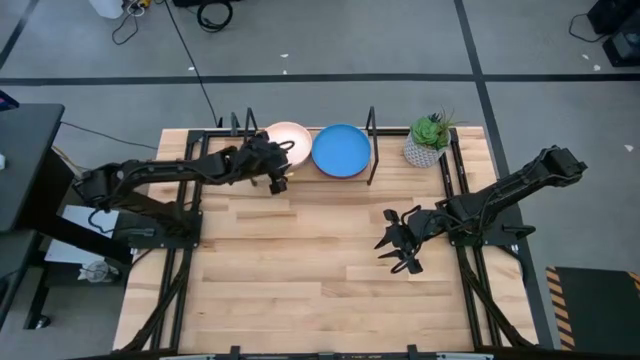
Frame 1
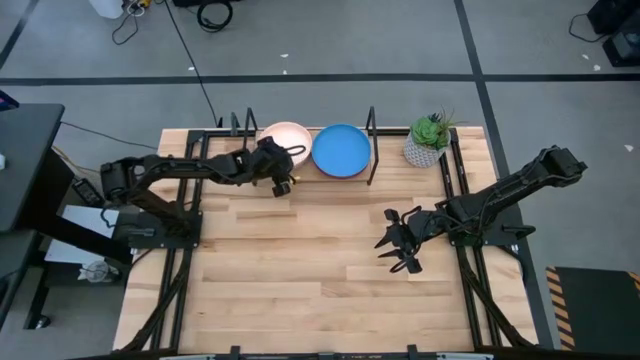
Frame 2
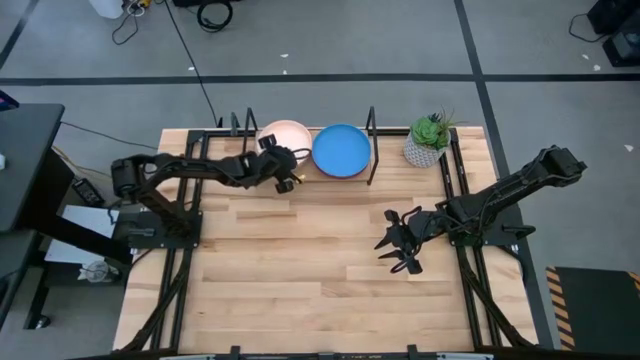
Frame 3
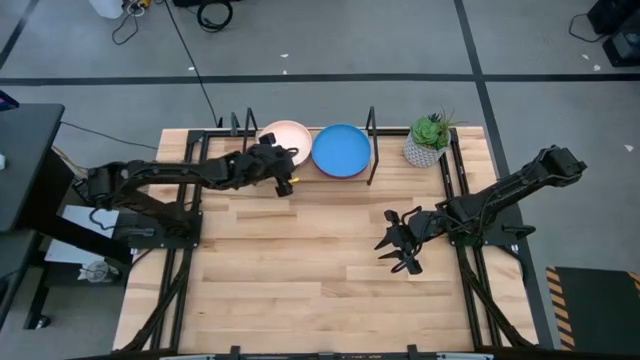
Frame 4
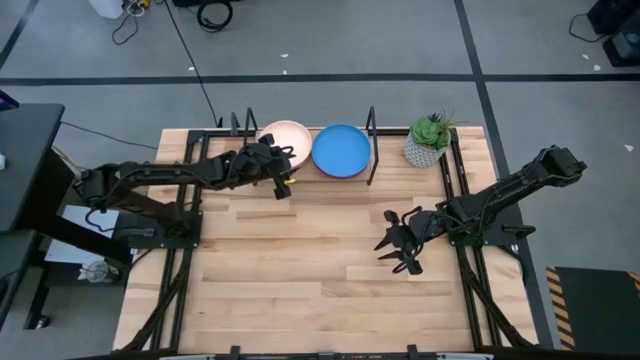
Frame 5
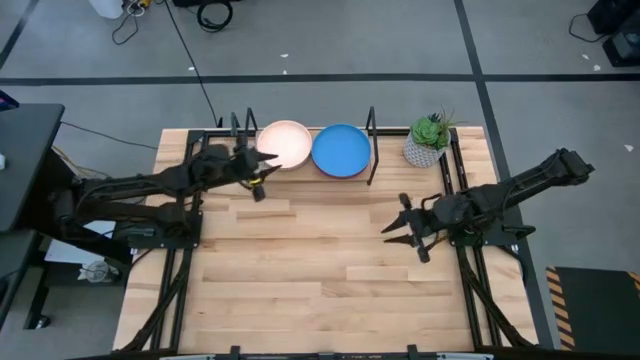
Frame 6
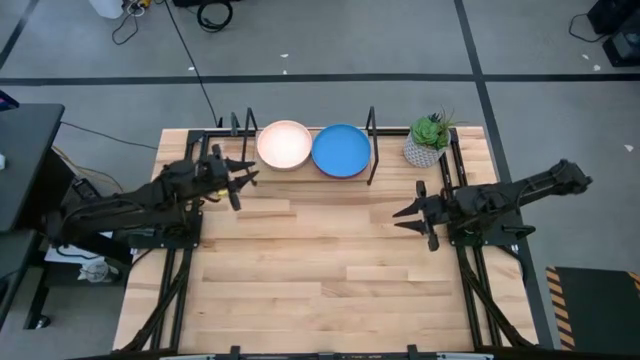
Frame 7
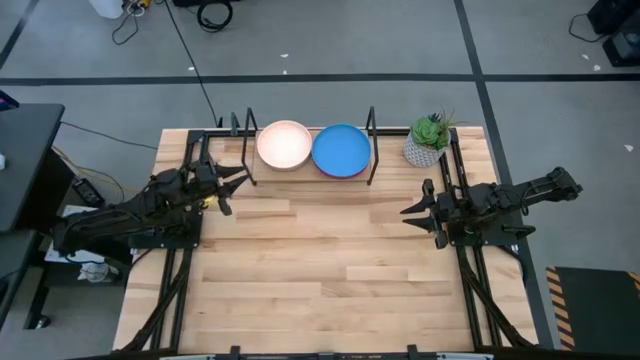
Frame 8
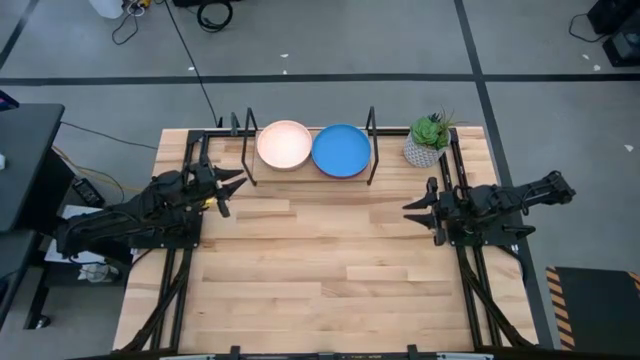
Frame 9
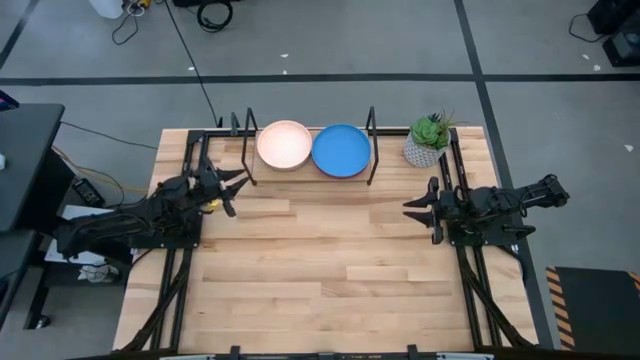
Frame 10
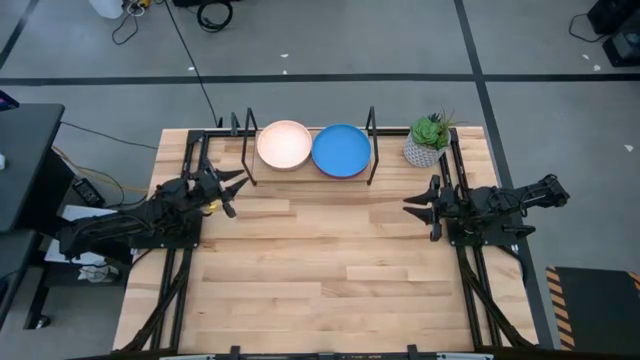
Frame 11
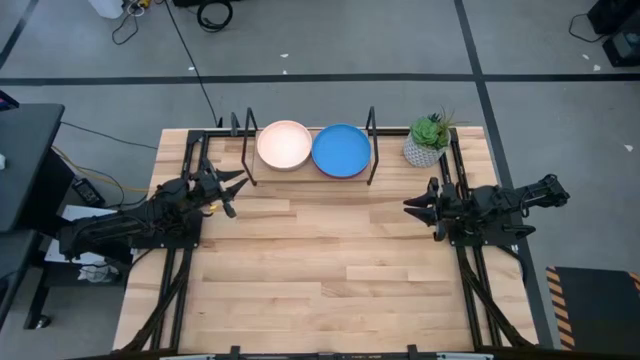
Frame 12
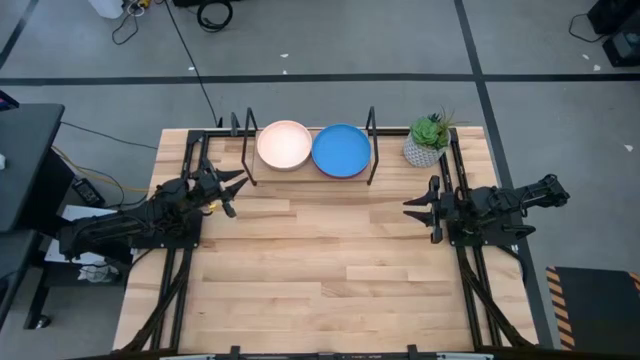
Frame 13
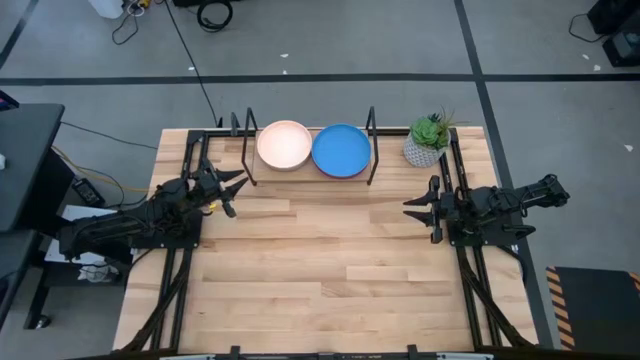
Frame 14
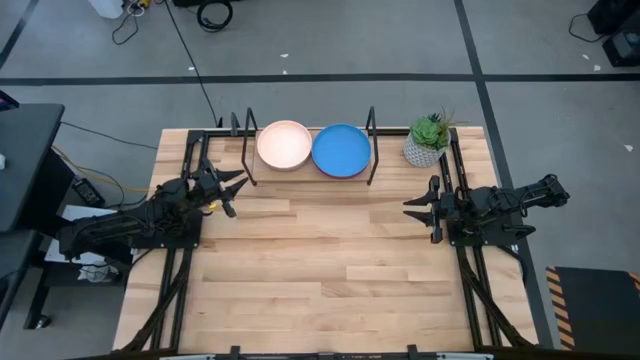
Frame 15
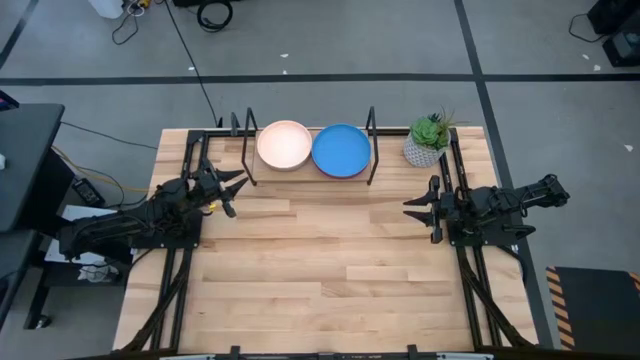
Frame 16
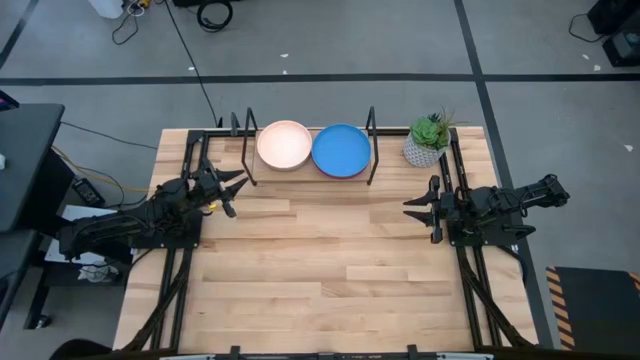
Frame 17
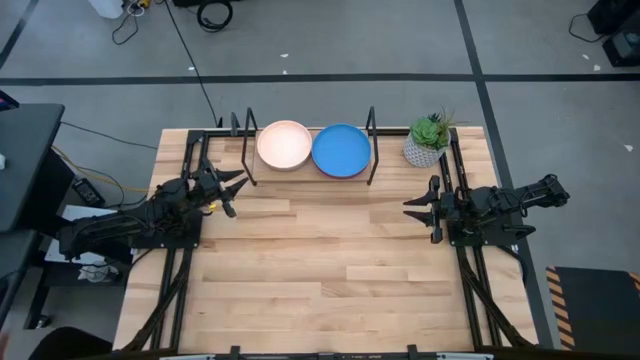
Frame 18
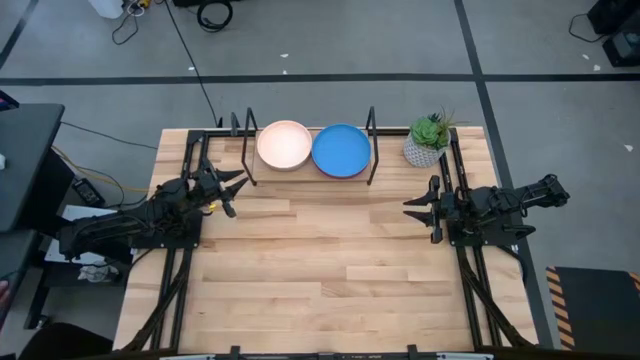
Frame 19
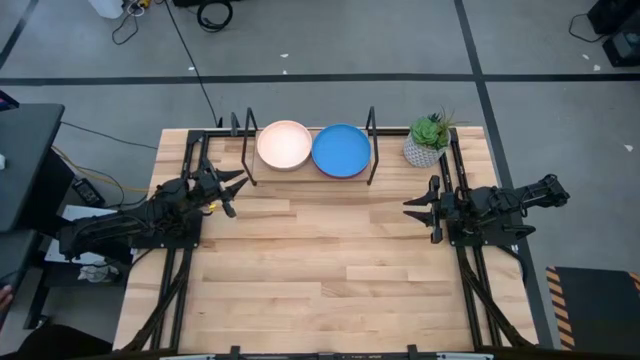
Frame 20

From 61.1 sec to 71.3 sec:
Task: Place and stack plates onto a shelf
Return to Home Position

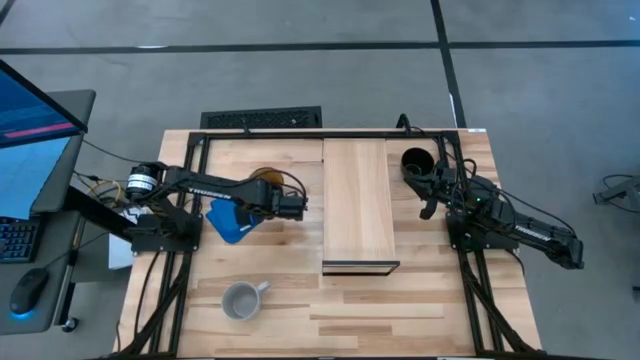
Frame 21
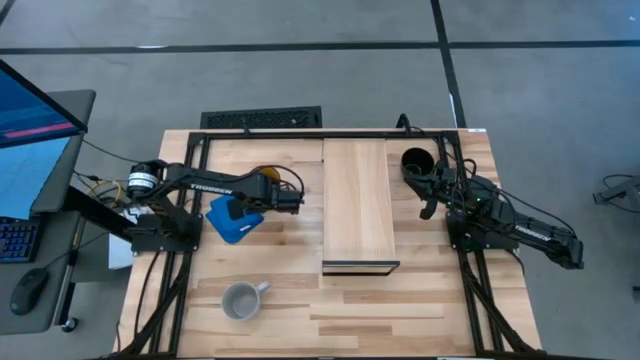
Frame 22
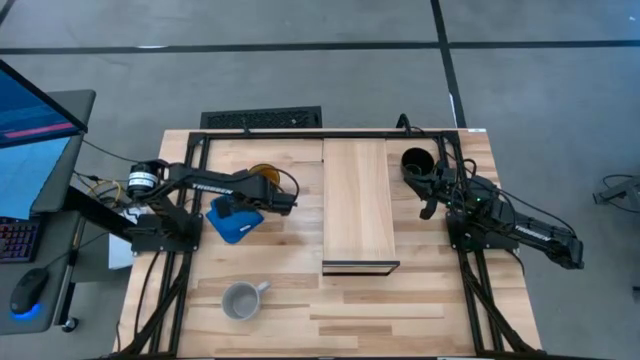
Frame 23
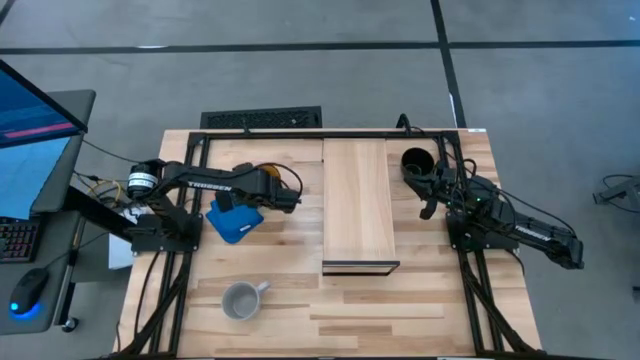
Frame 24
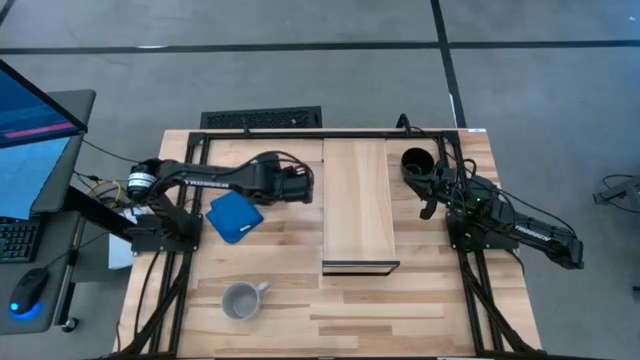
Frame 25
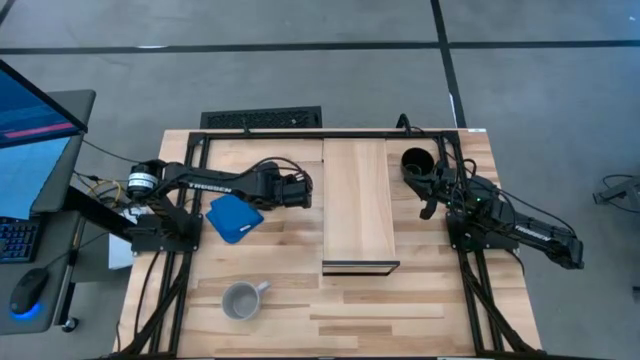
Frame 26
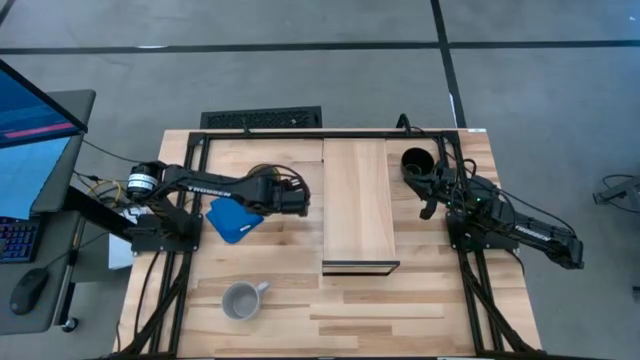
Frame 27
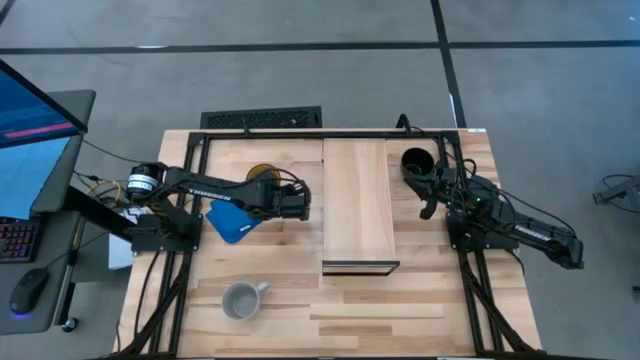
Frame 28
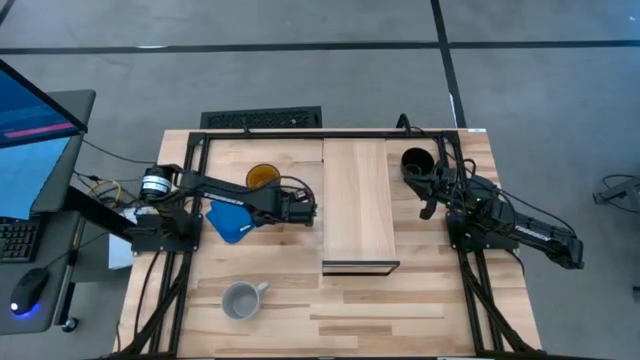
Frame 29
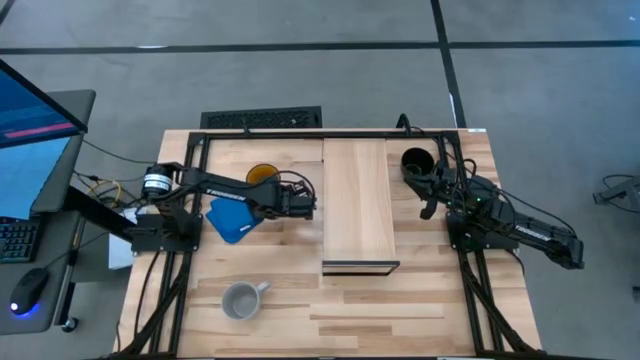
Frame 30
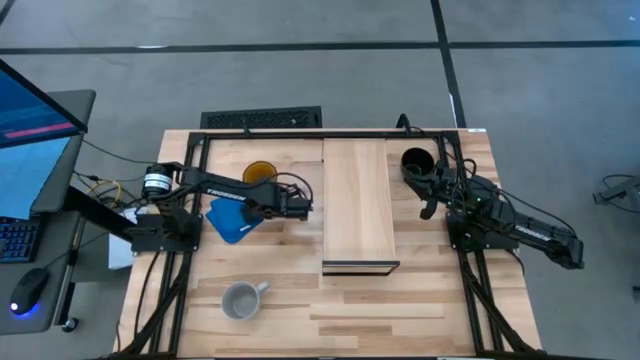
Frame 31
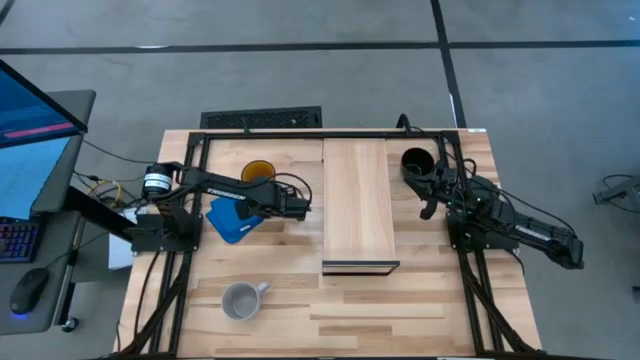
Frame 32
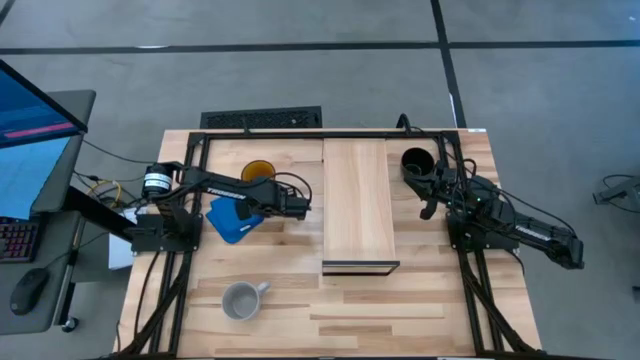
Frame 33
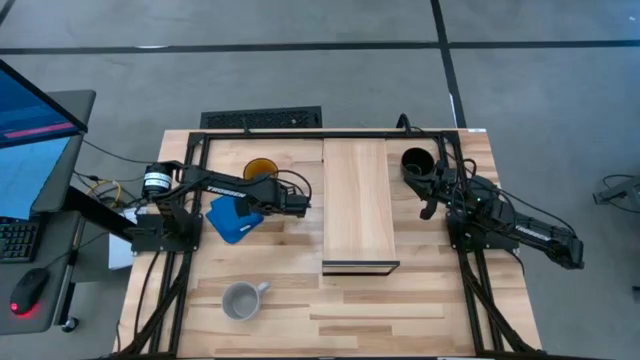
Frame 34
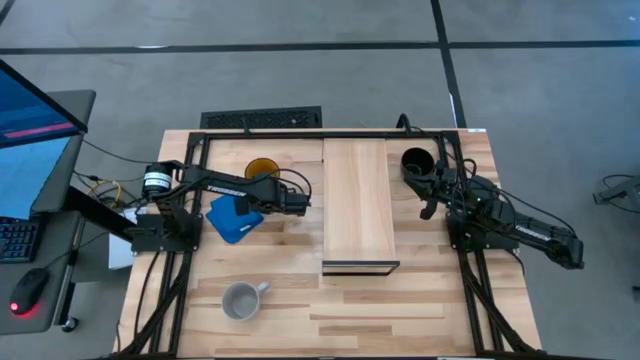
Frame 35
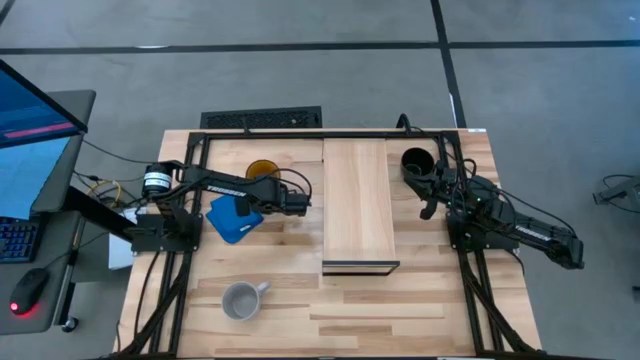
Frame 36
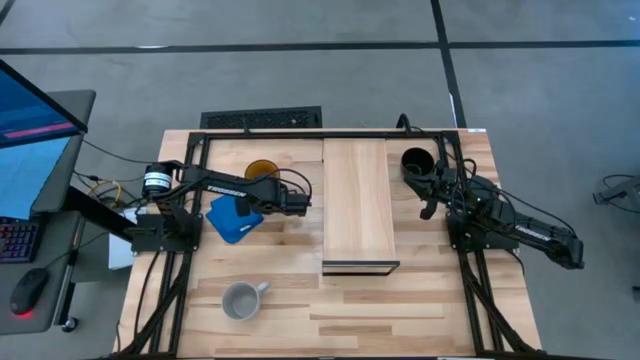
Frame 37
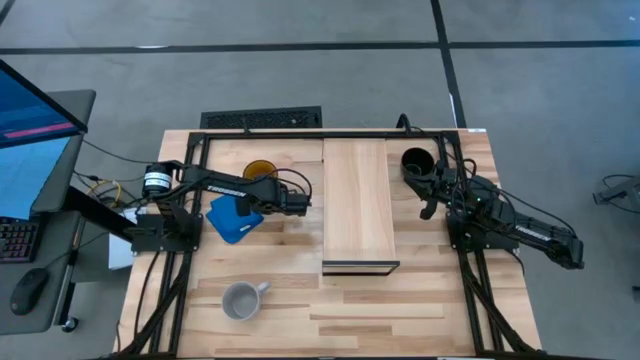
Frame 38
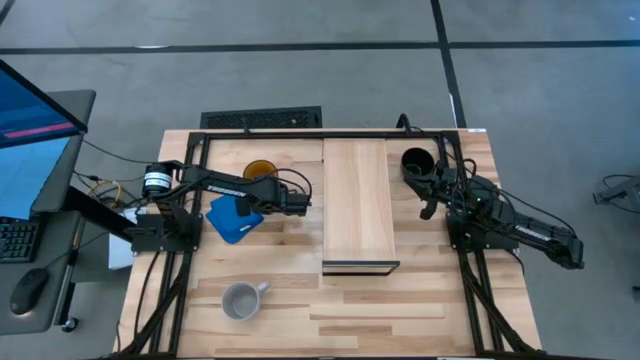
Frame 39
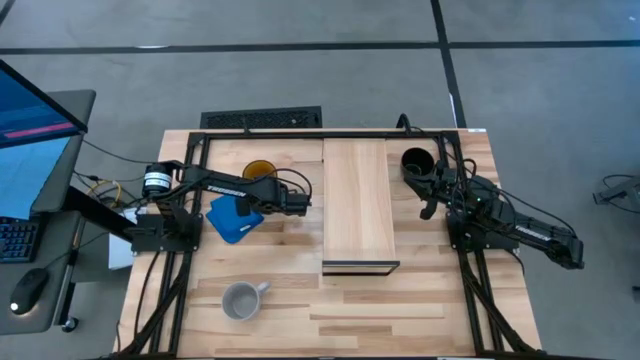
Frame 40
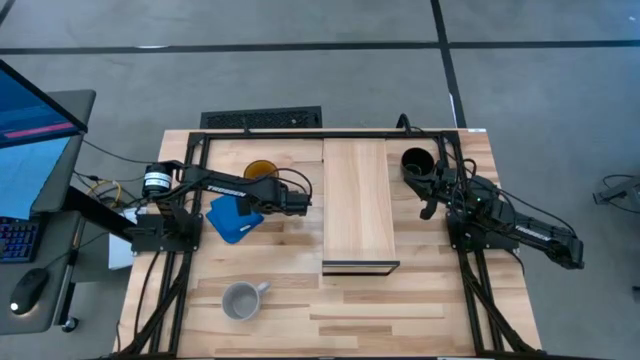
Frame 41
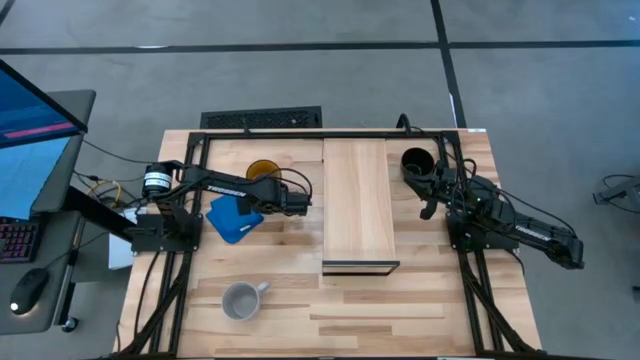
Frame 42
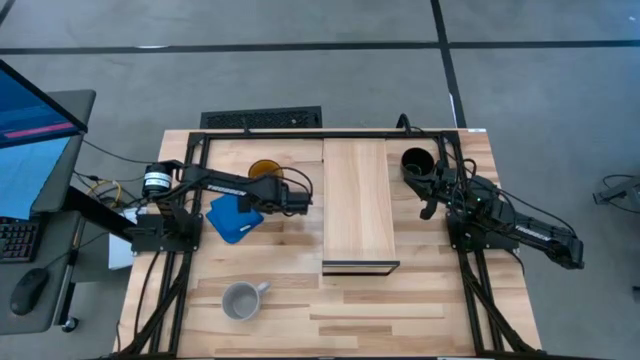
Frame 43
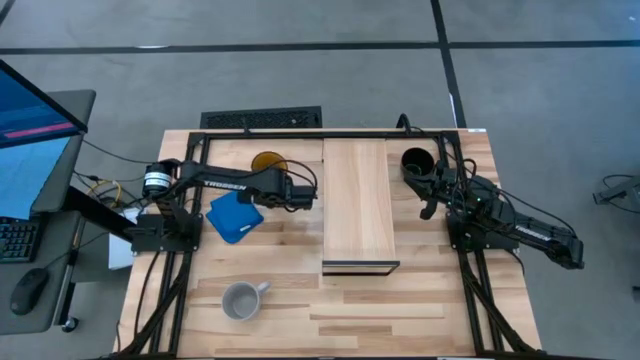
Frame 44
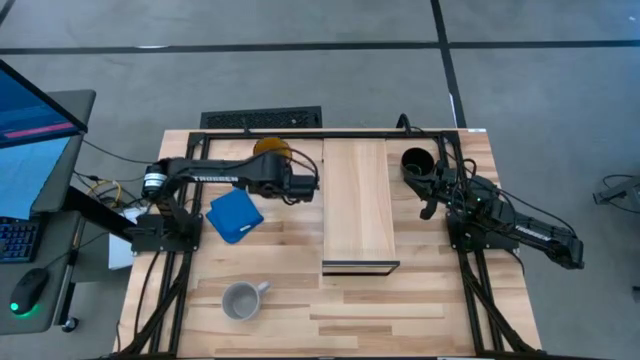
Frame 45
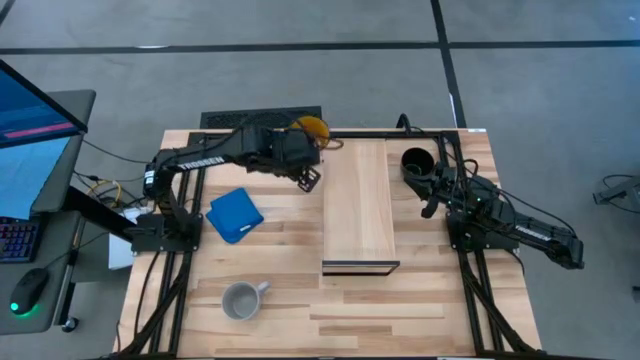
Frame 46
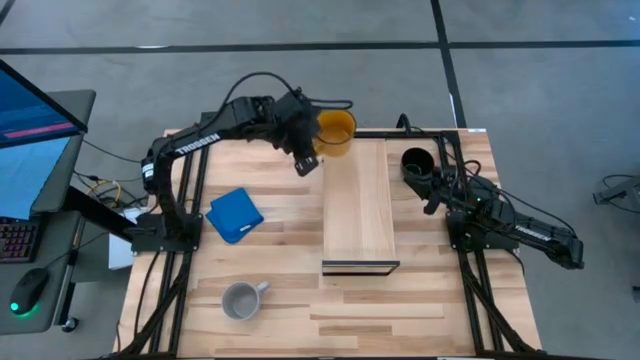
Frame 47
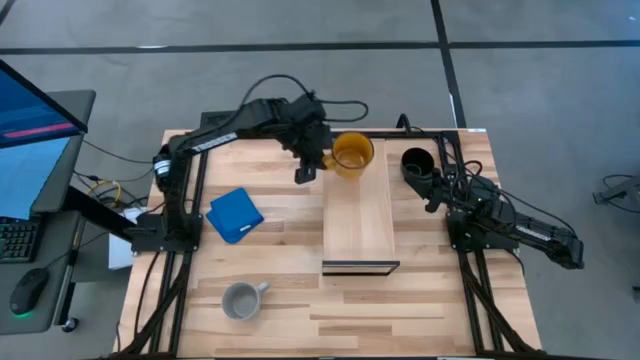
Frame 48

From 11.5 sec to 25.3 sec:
Task: Stack small to large cups/mugs on shelf
Put the yellow mug on the shelf
